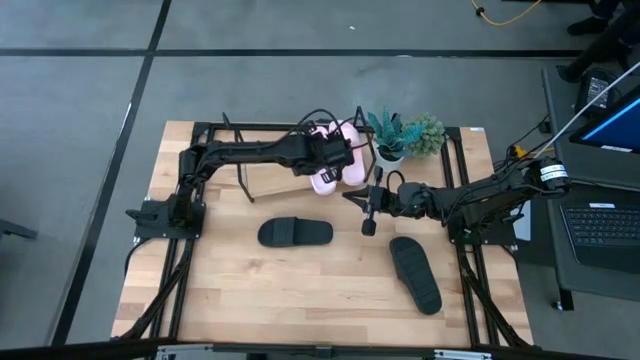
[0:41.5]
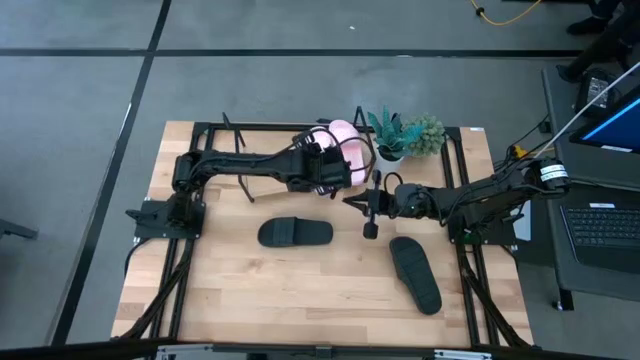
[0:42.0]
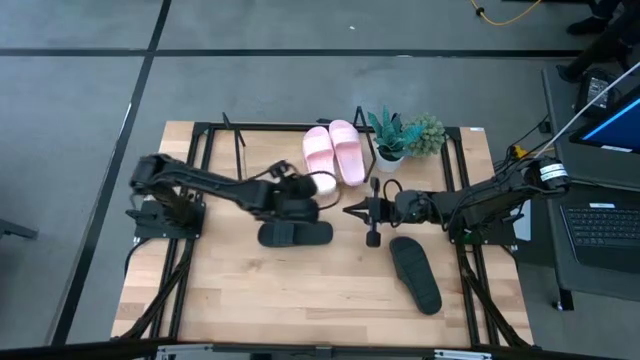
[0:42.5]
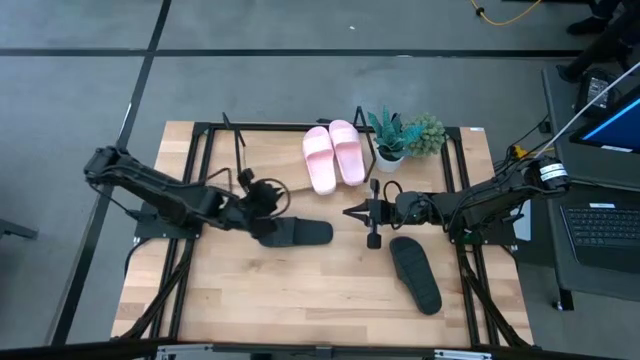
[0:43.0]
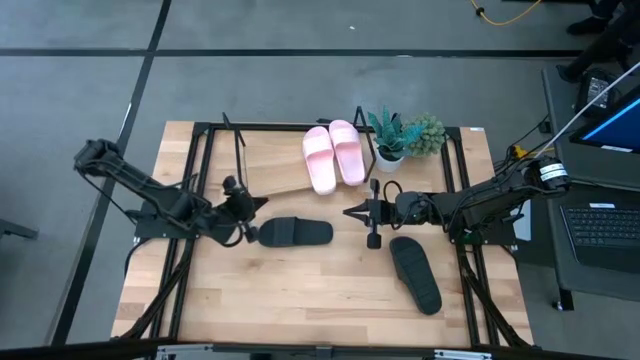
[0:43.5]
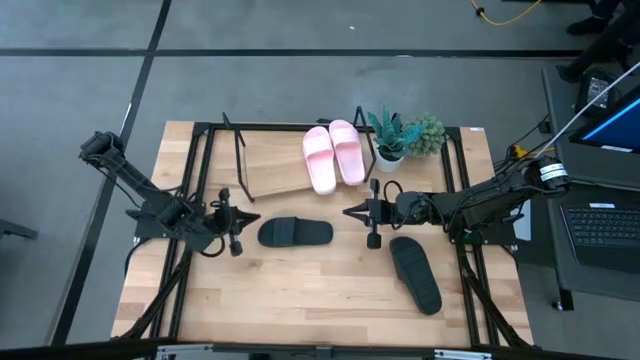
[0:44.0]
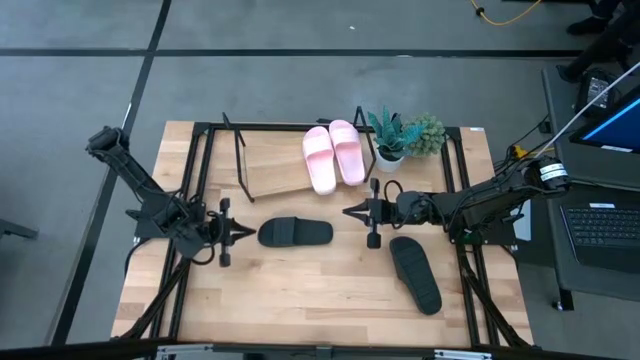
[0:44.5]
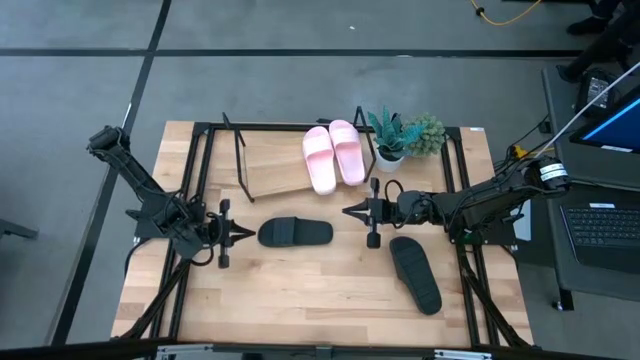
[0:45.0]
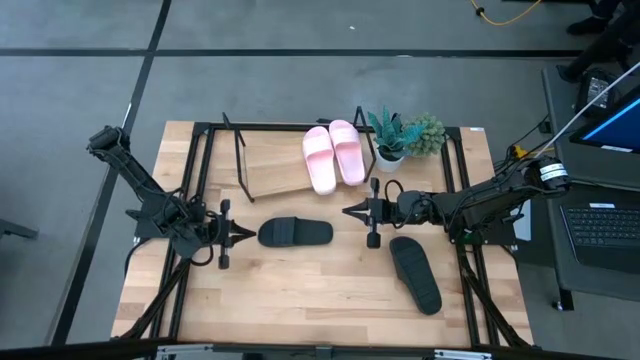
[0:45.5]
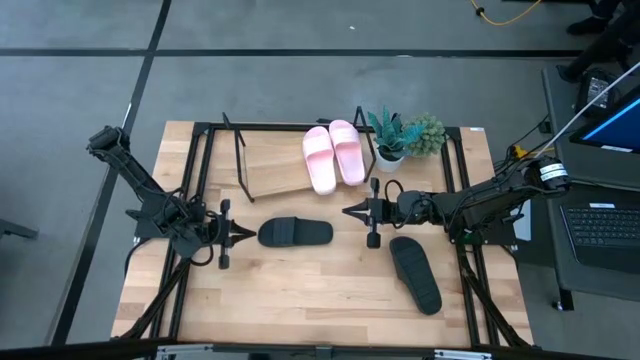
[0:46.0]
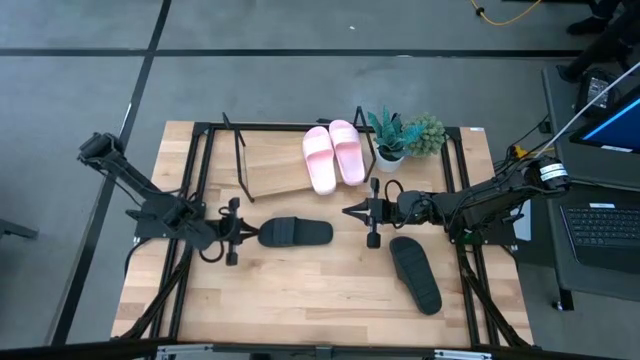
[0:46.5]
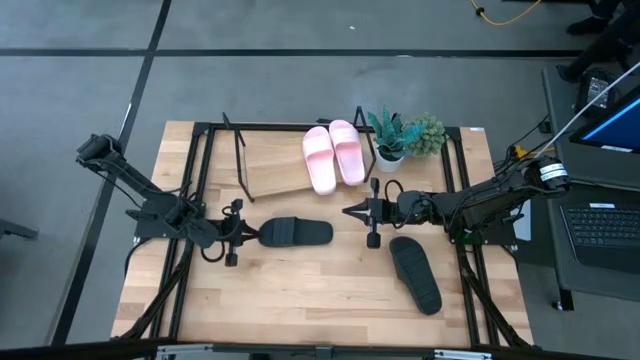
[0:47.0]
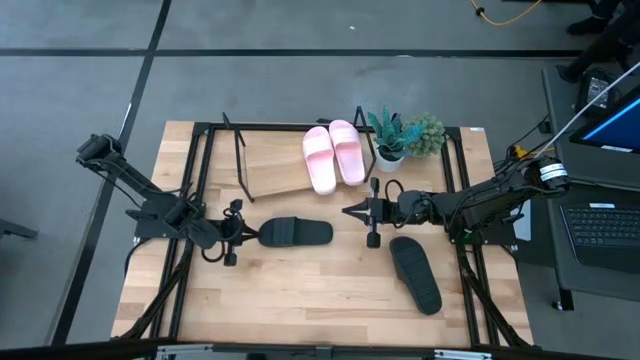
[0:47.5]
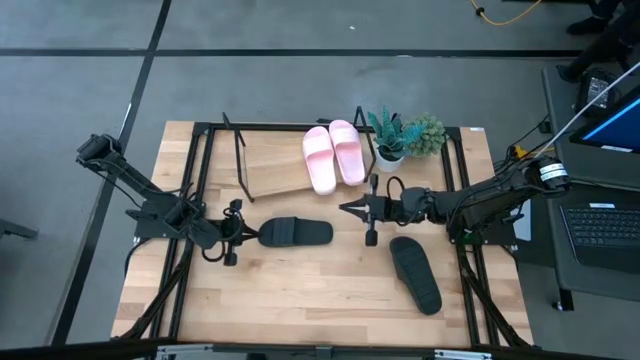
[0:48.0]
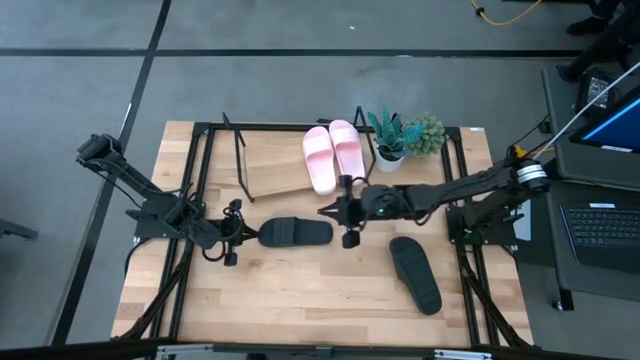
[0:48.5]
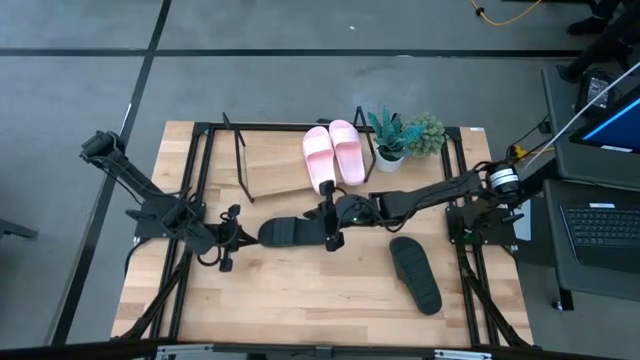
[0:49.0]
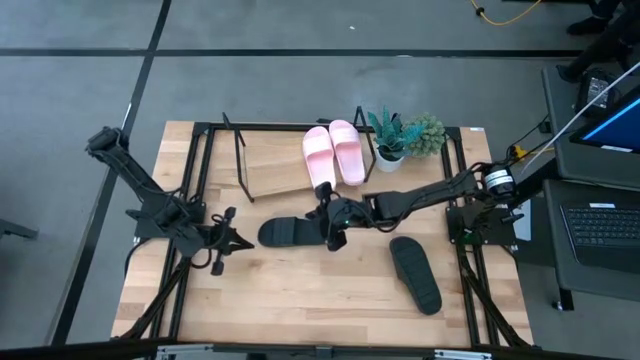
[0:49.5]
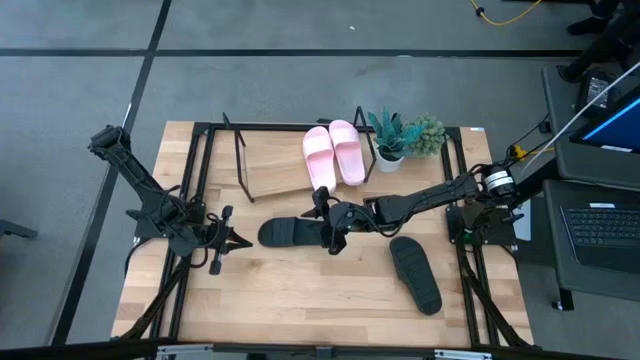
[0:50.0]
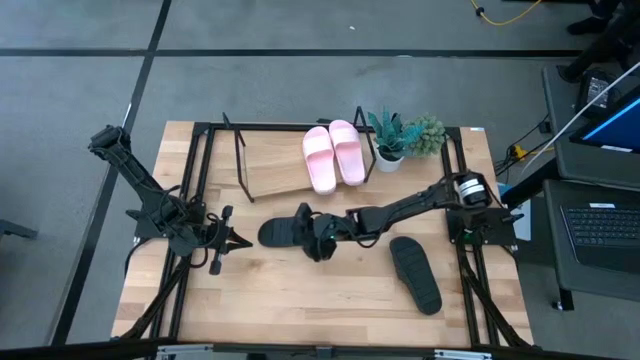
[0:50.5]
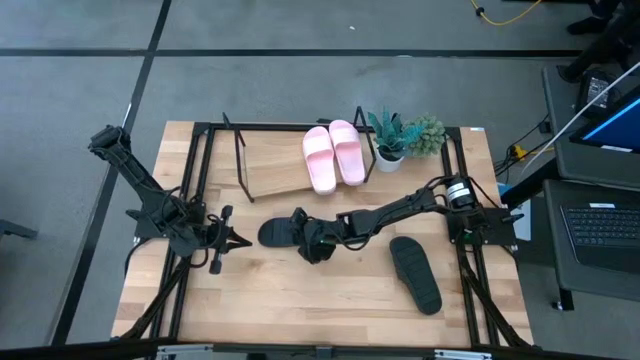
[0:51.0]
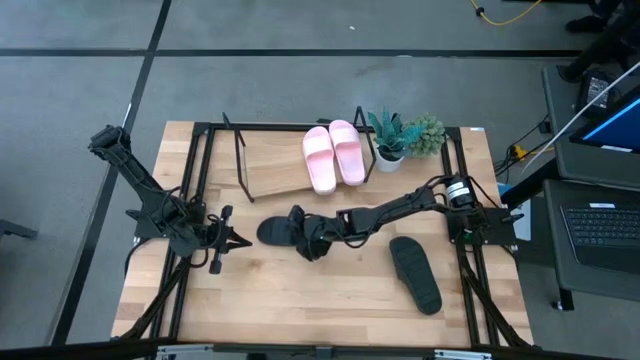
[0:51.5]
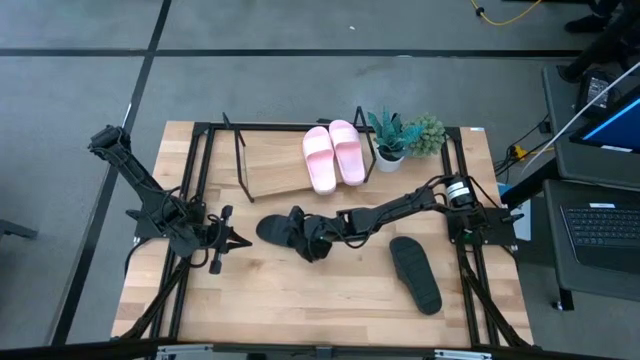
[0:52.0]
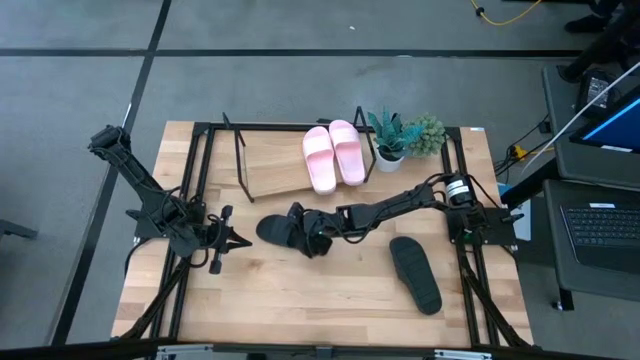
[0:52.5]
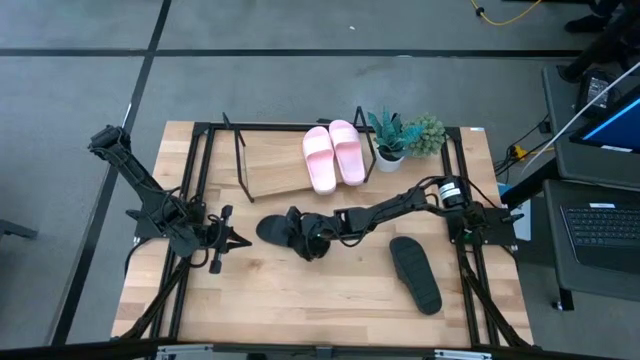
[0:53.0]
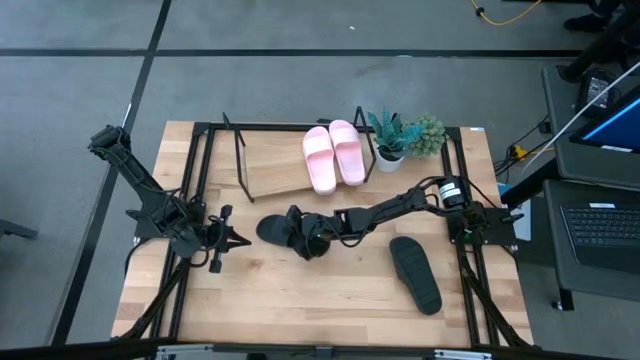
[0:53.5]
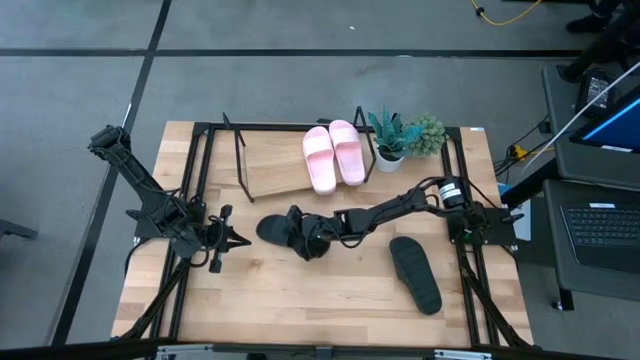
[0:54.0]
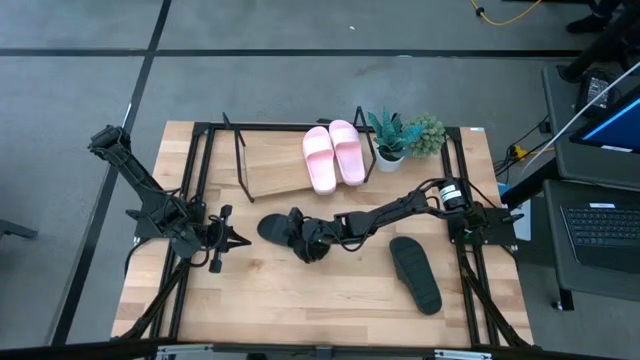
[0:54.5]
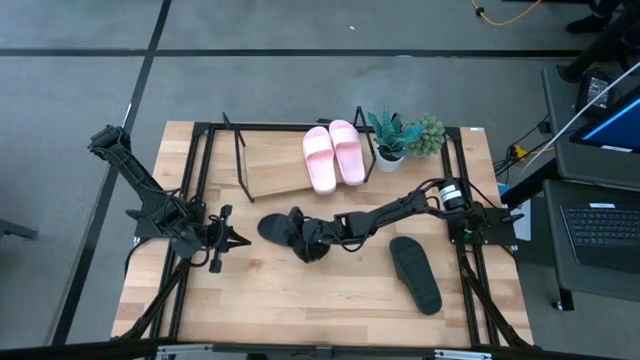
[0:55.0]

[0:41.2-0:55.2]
Task: Pick and place slides into the shelf
Put the left black slide on the shelf

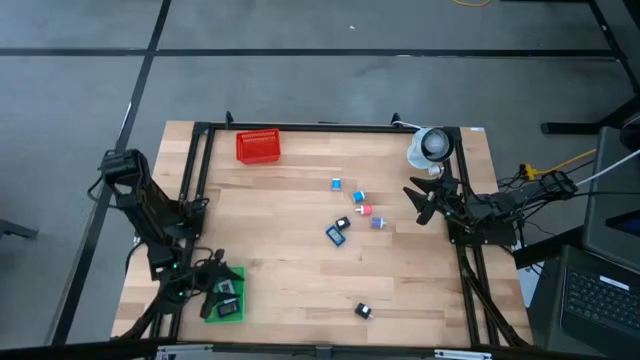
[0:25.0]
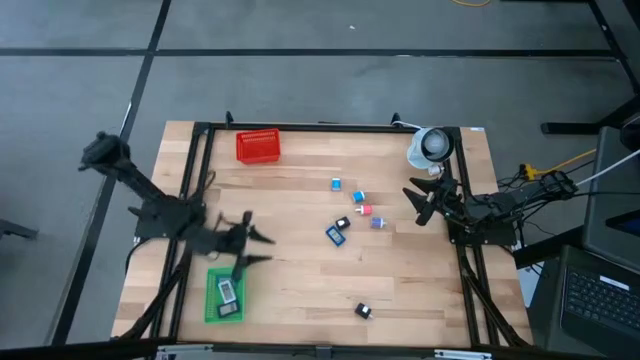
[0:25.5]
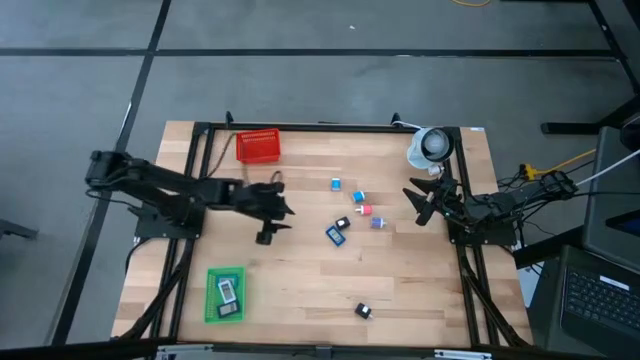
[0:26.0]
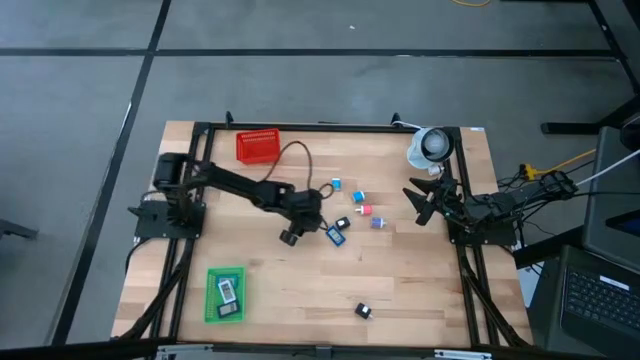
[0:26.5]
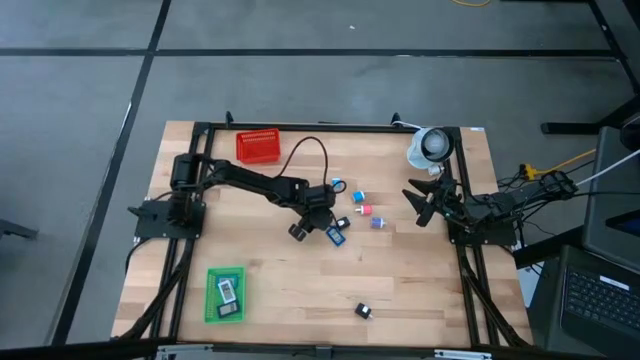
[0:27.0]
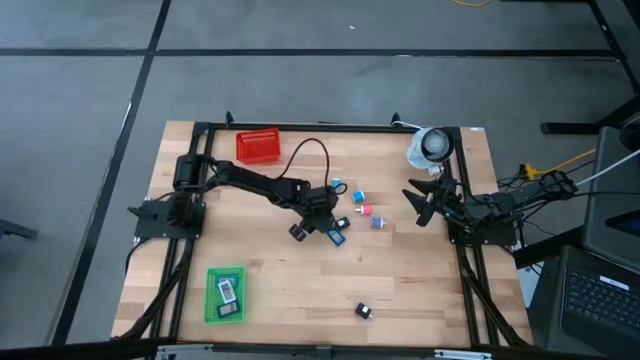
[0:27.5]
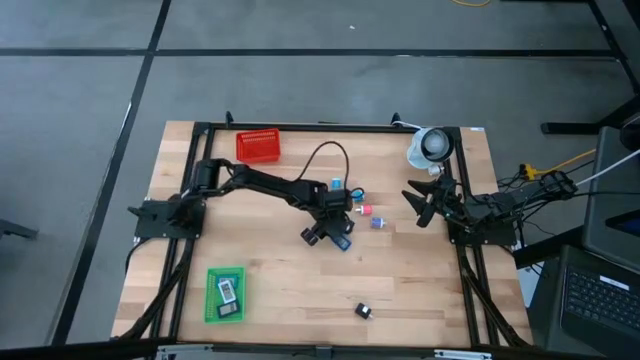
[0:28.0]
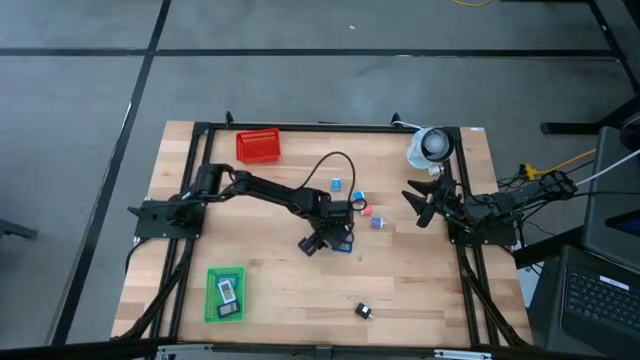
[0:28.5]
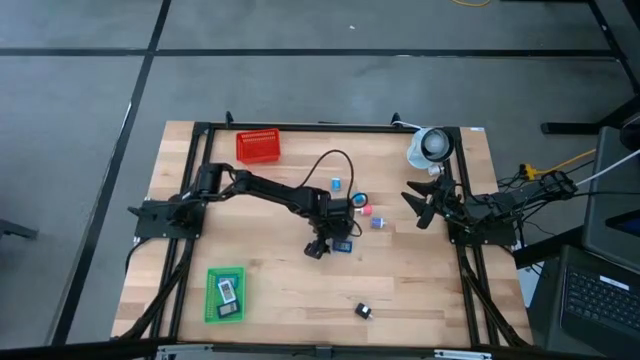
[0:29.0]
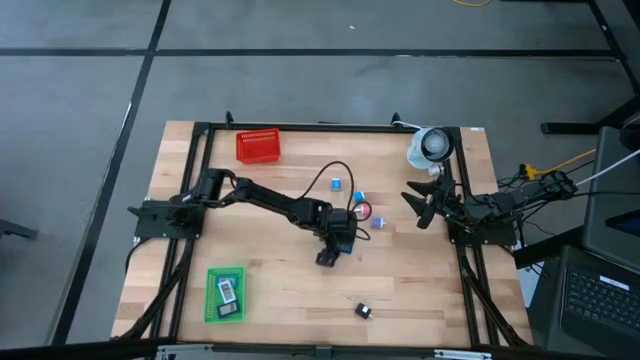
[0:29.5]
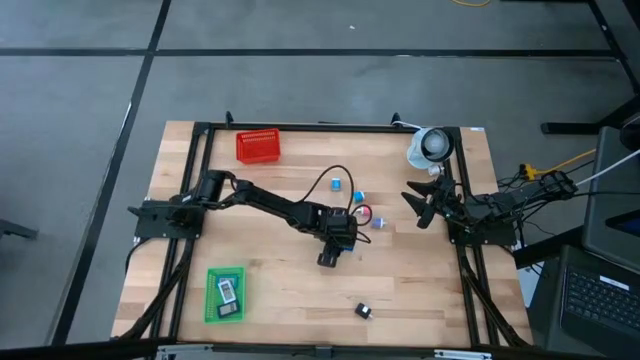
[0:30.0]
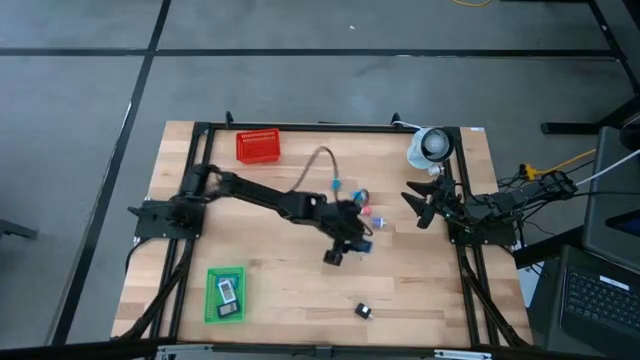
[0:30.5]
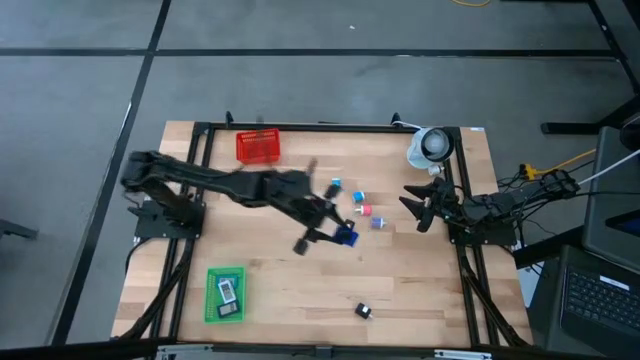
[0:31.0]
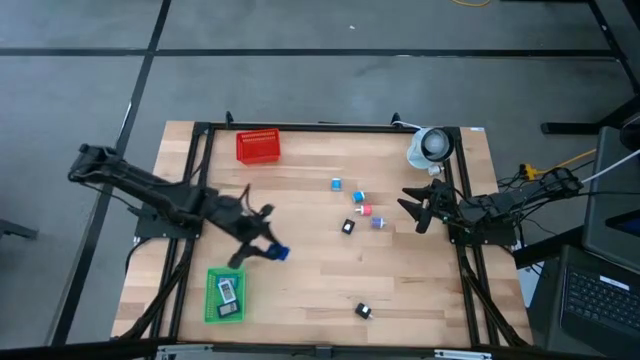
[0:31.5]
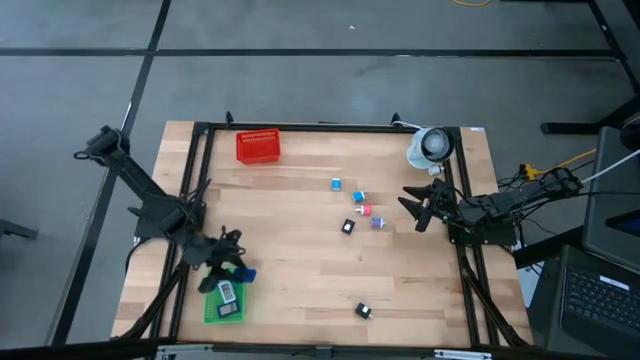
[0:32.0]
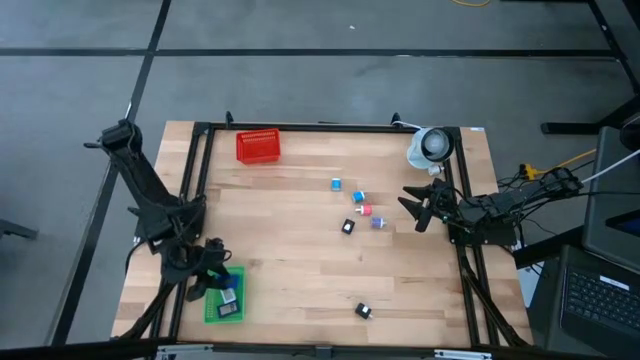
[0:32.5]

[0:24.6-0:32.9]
Task: Pick & Place Office items
Put the blue digital timer into the green bin
